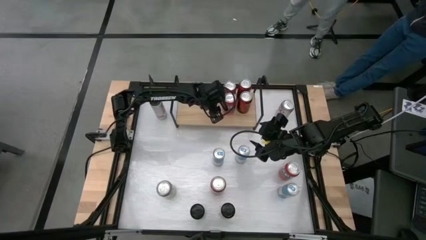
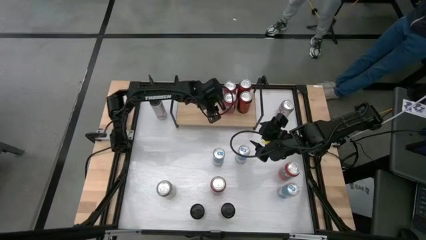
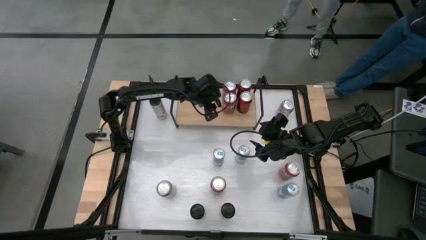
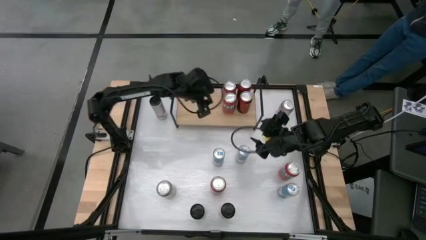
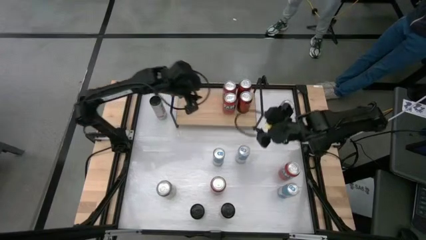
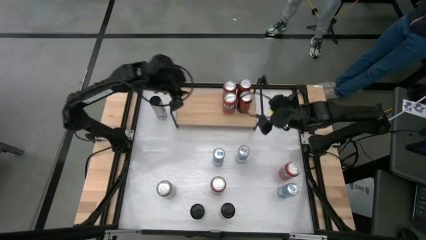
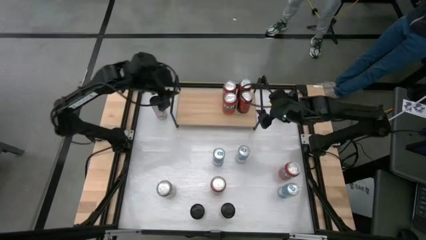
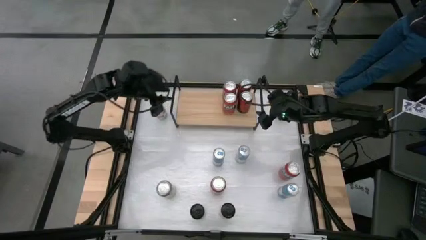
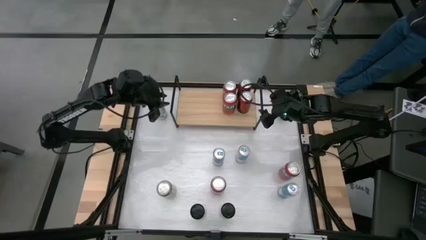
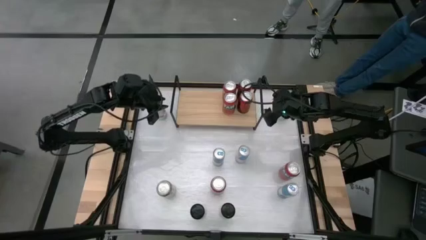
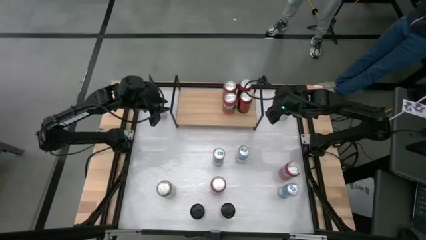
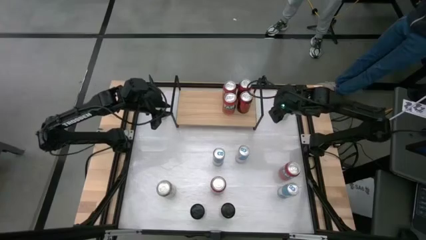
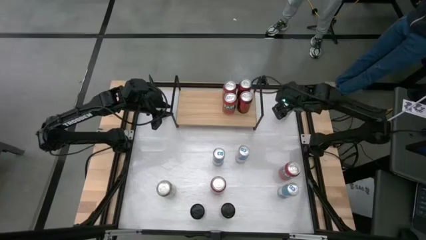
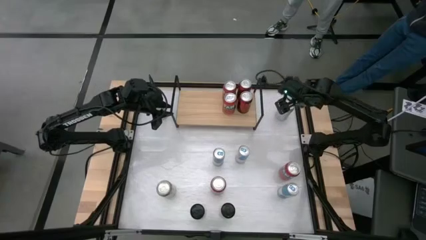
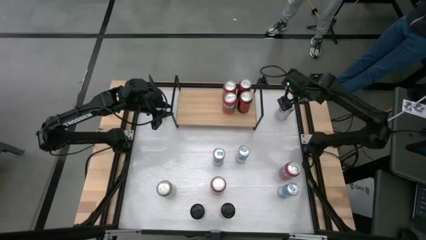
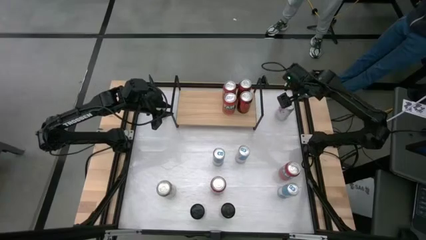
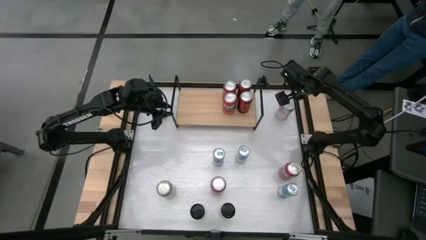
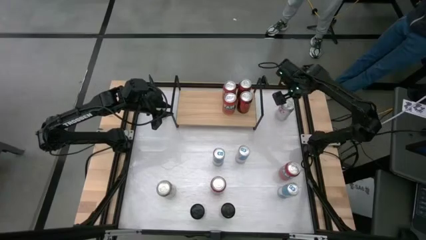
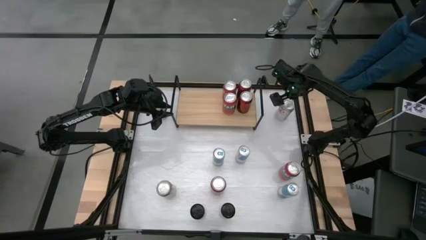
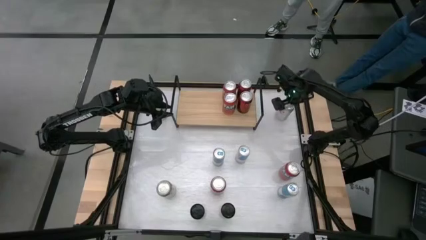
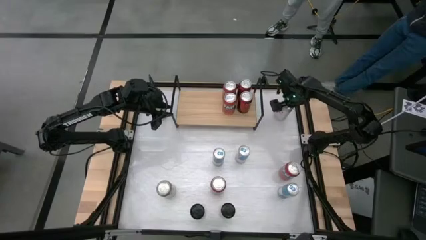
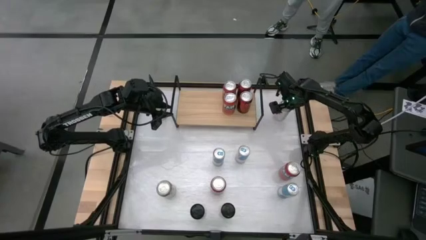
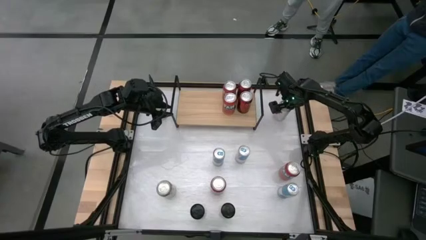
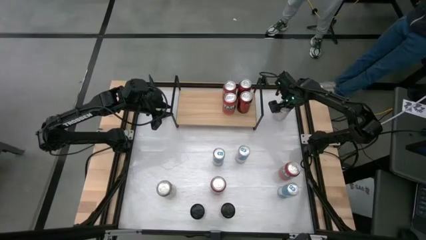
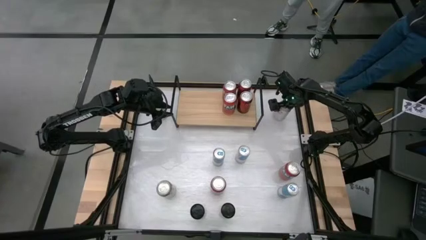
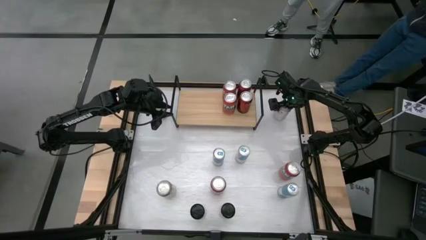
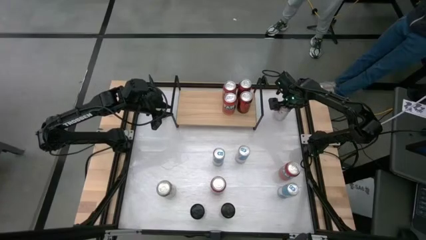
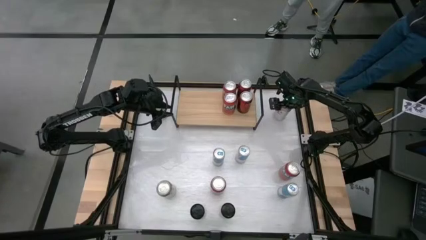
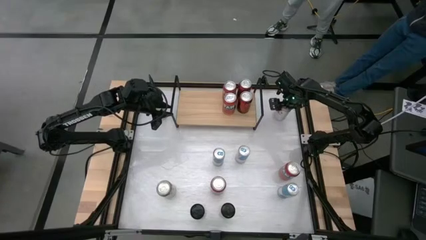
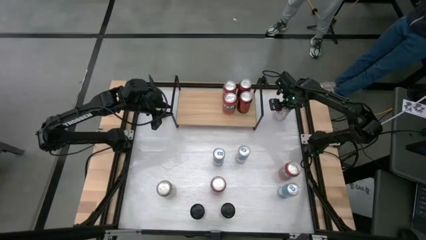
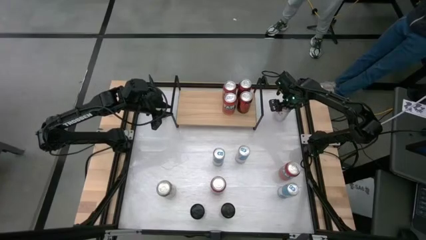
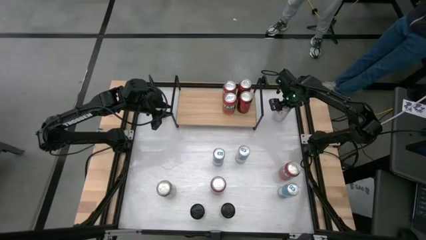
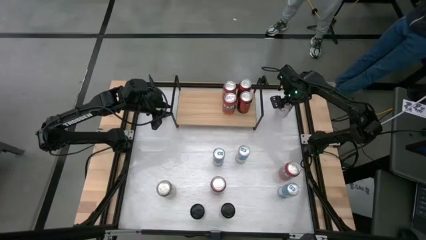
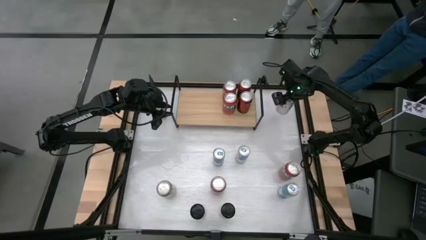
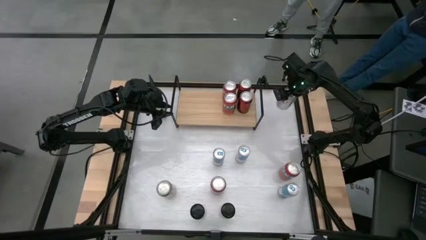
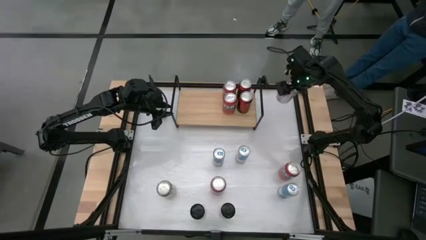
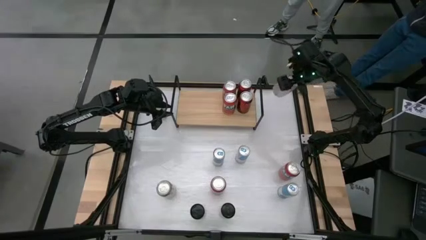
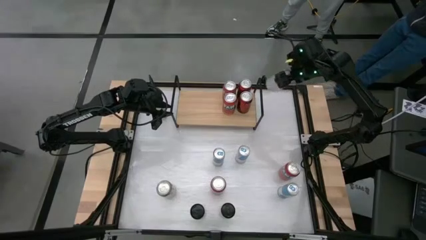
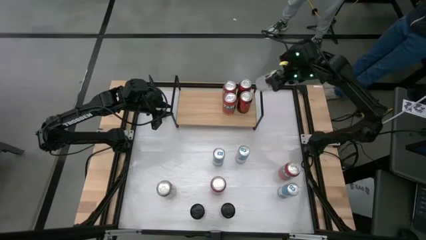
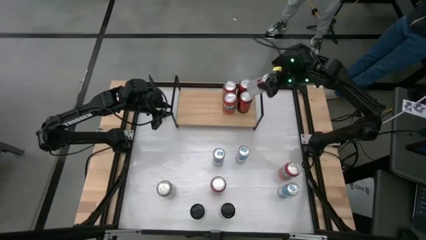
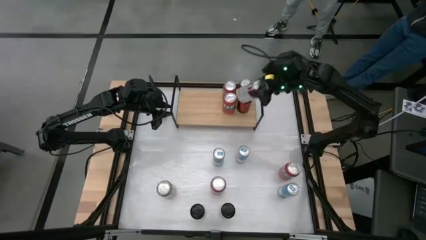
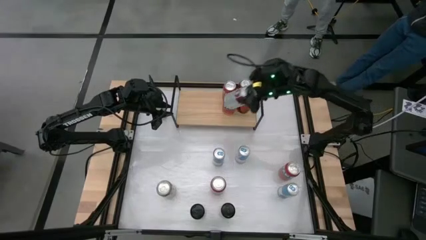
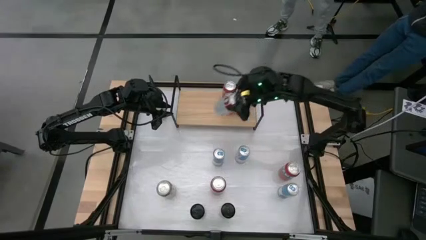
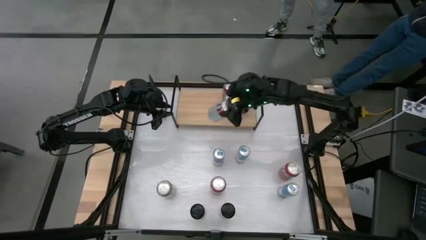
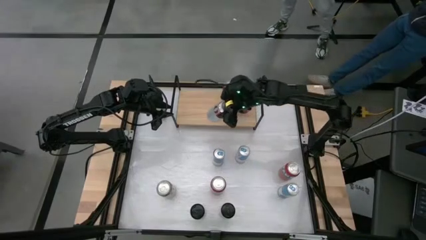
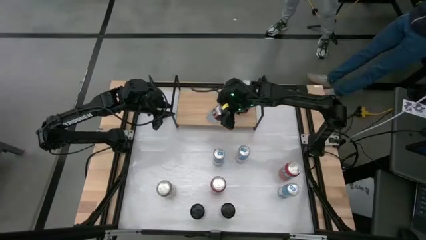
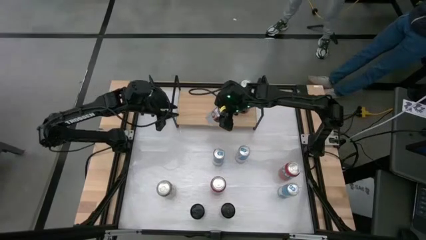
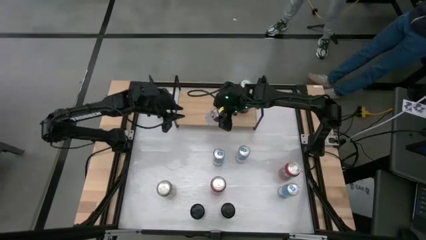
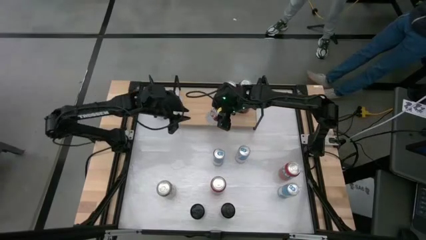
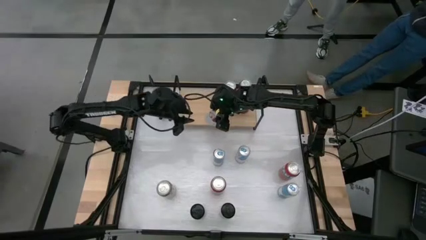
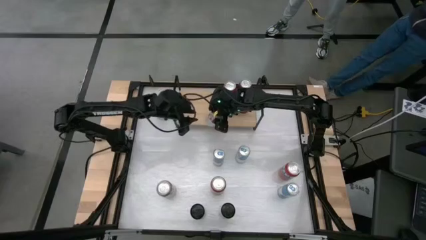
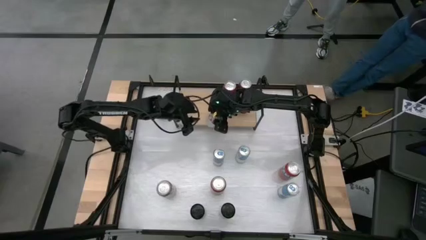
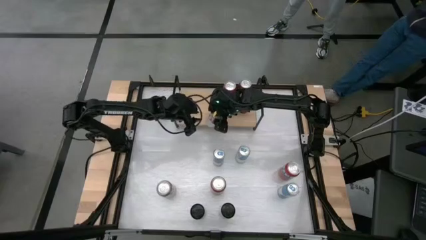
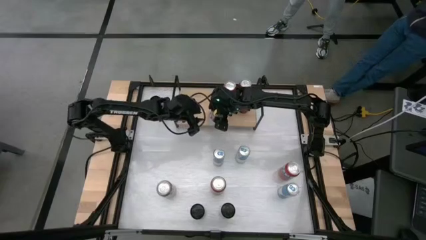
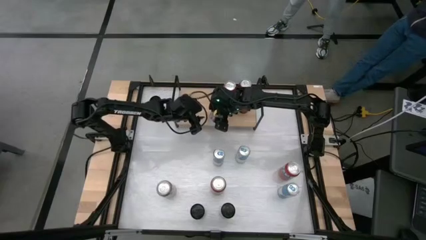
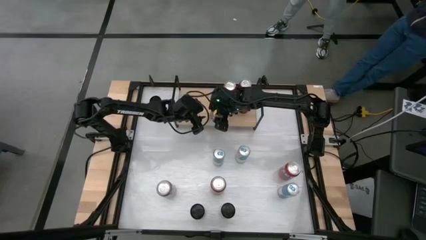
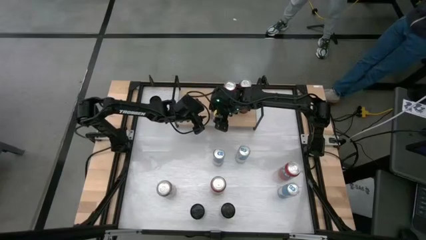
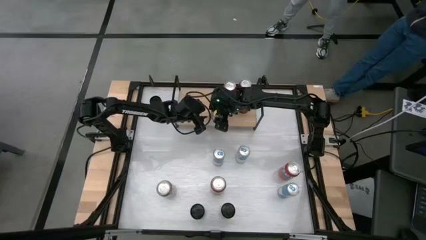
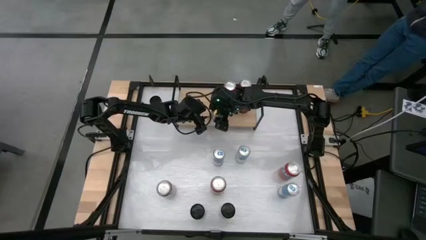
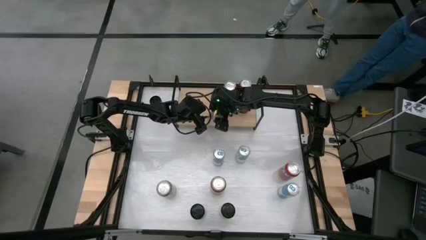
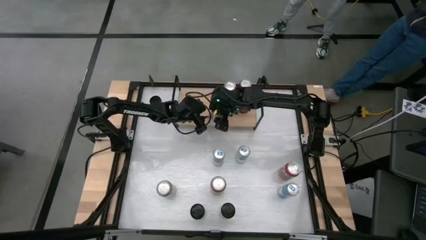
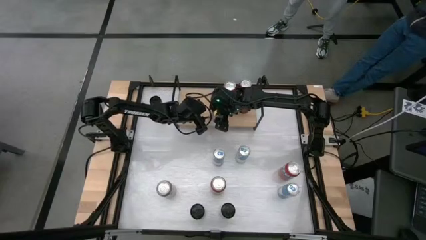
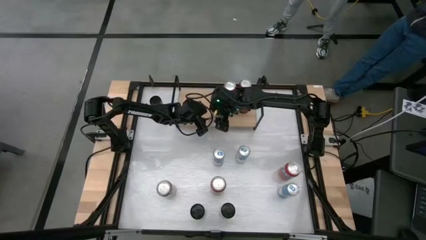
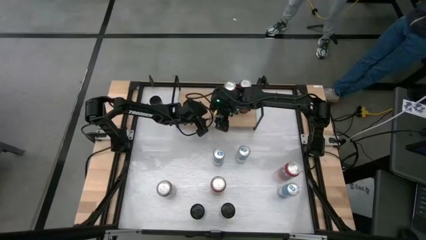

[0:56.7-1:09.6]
Task: Place canned beverage on shelf
Put the red and silver soda can on the shelf
